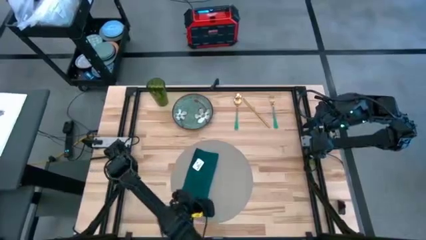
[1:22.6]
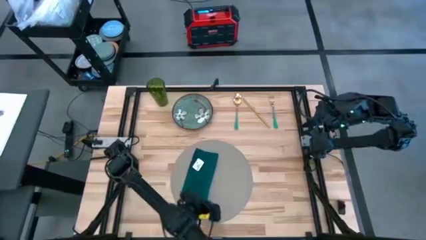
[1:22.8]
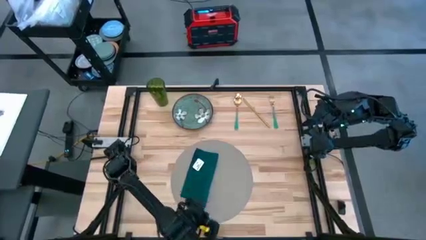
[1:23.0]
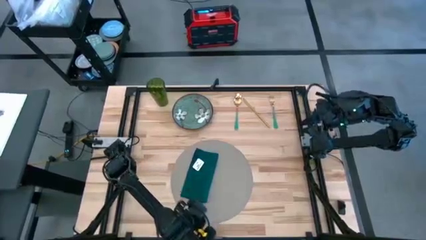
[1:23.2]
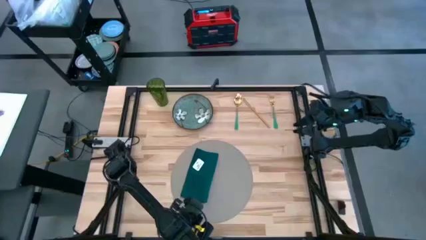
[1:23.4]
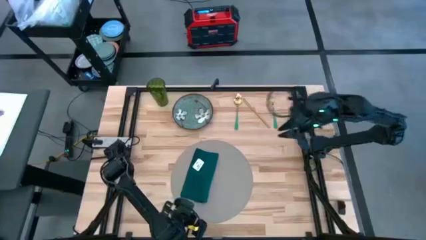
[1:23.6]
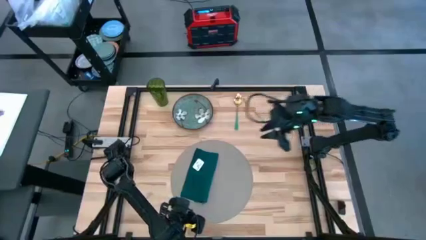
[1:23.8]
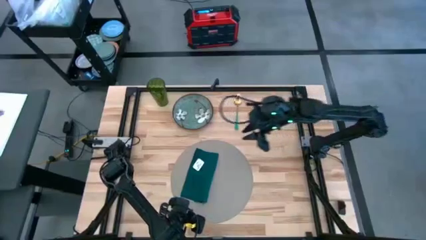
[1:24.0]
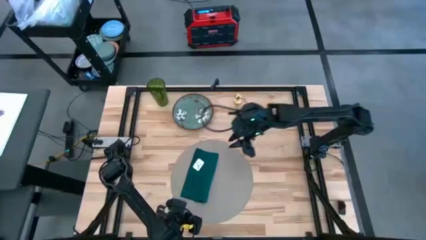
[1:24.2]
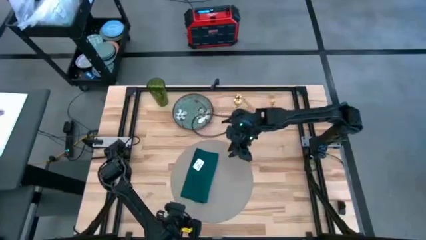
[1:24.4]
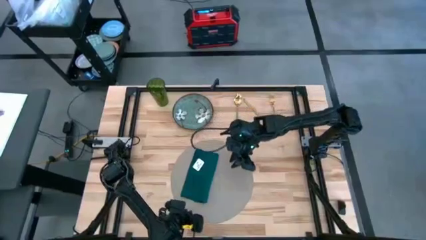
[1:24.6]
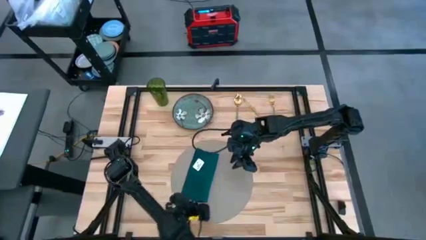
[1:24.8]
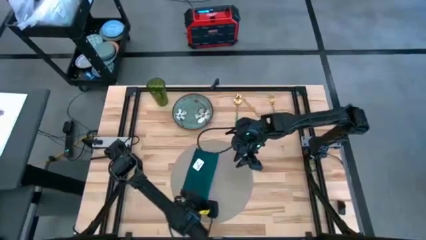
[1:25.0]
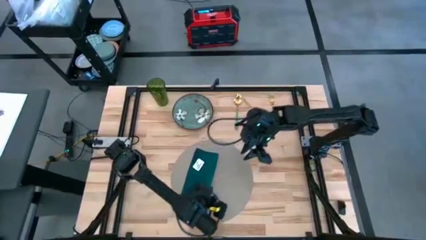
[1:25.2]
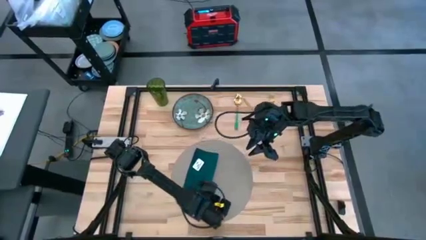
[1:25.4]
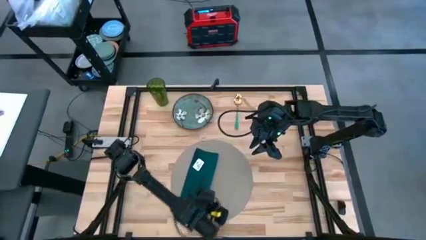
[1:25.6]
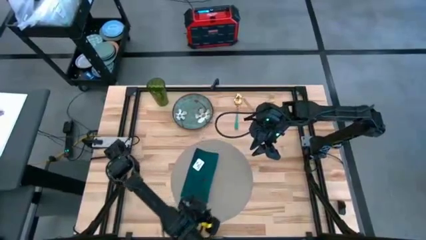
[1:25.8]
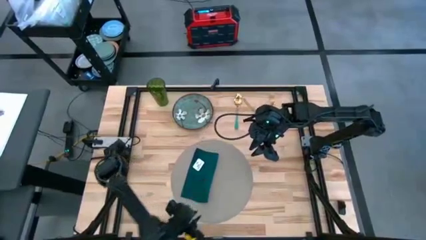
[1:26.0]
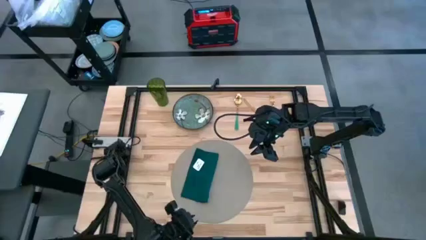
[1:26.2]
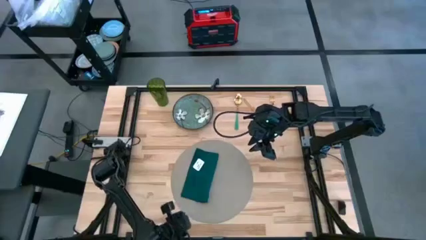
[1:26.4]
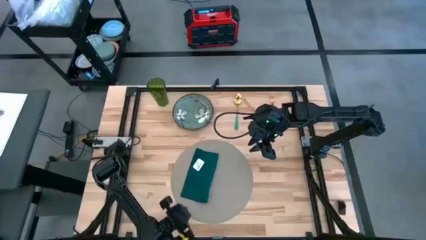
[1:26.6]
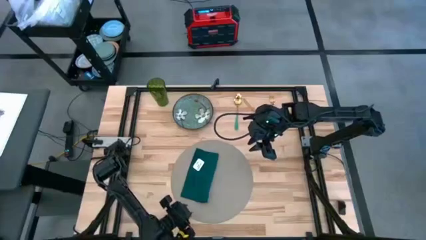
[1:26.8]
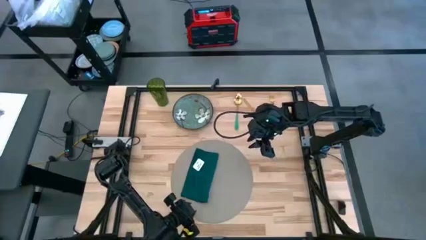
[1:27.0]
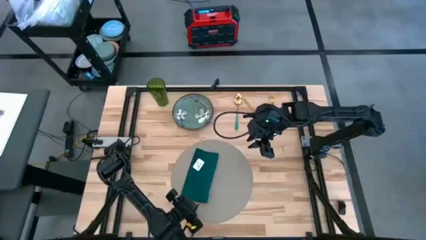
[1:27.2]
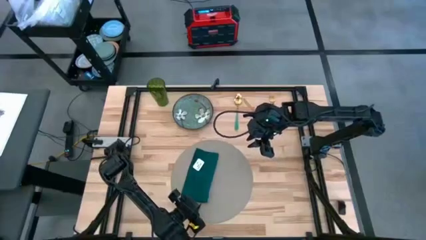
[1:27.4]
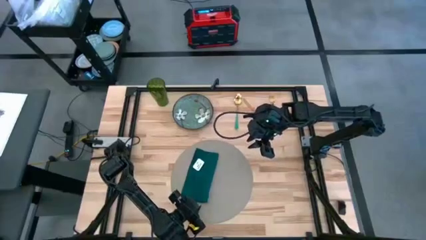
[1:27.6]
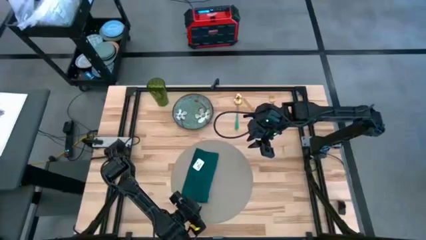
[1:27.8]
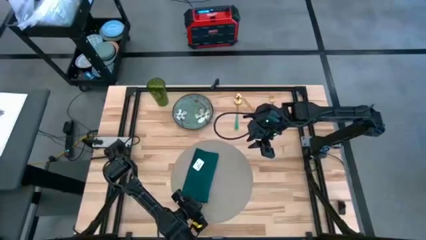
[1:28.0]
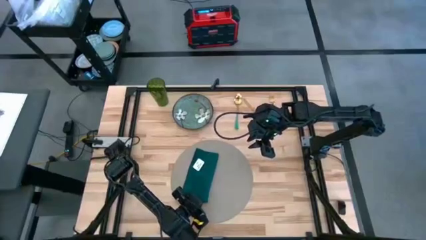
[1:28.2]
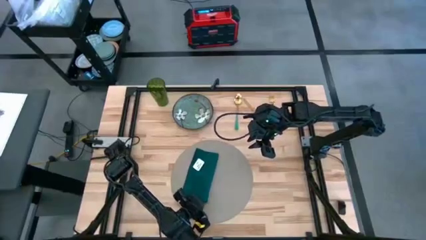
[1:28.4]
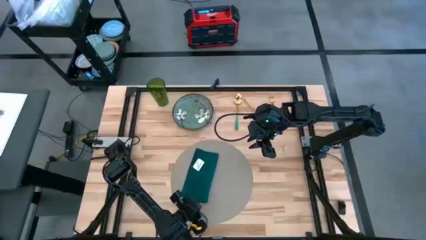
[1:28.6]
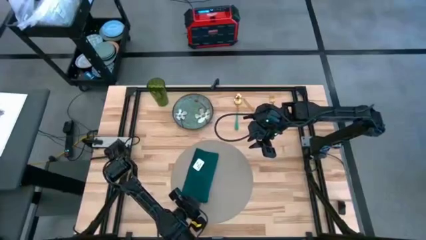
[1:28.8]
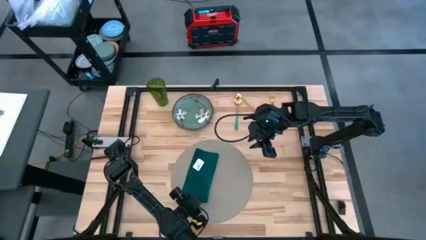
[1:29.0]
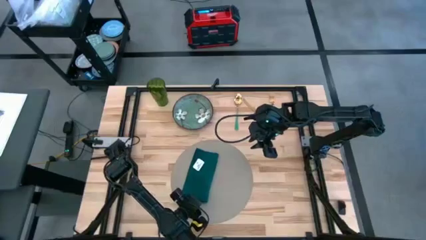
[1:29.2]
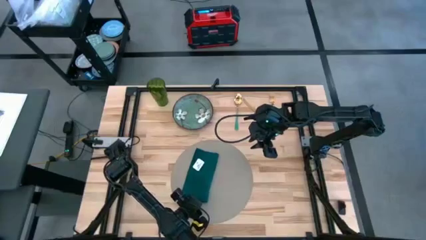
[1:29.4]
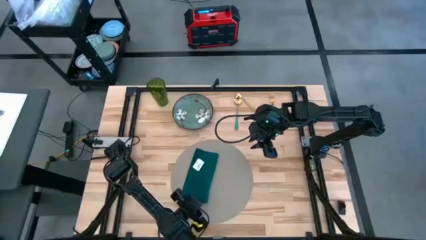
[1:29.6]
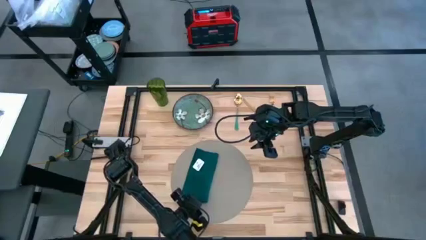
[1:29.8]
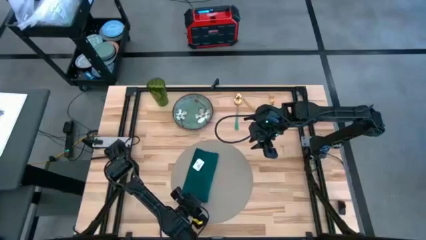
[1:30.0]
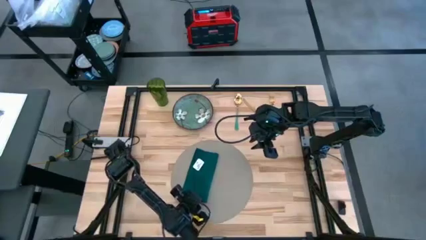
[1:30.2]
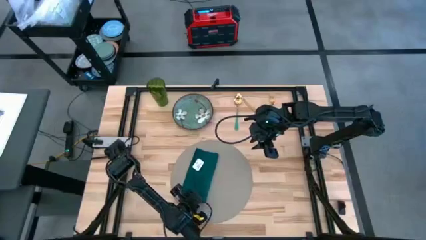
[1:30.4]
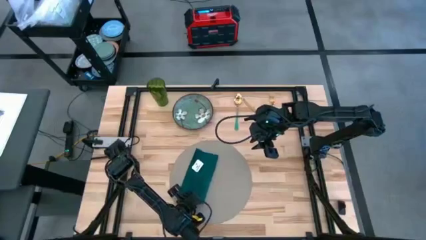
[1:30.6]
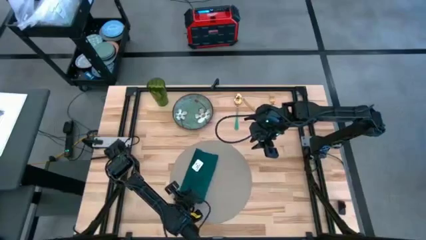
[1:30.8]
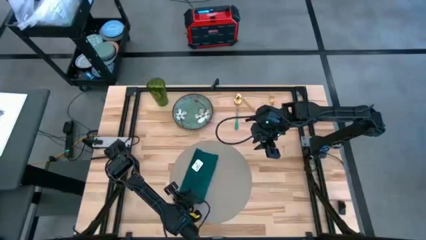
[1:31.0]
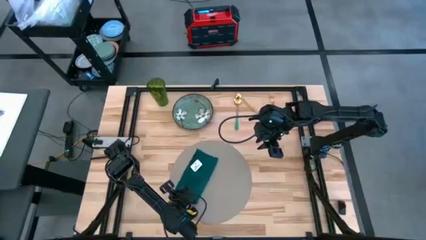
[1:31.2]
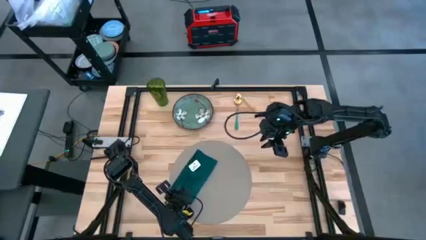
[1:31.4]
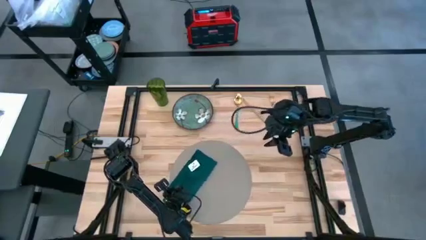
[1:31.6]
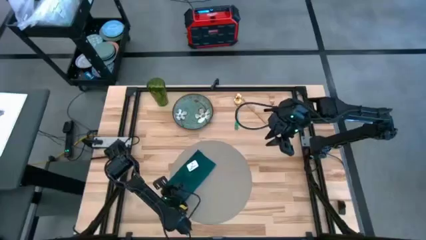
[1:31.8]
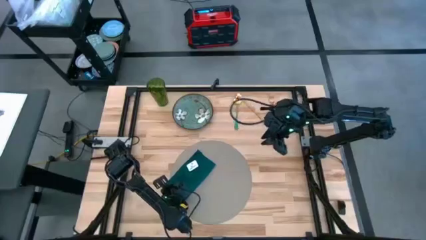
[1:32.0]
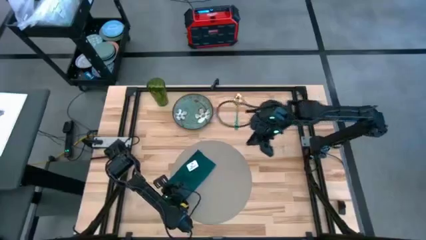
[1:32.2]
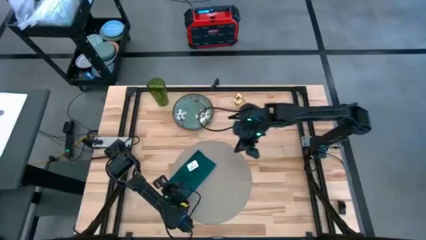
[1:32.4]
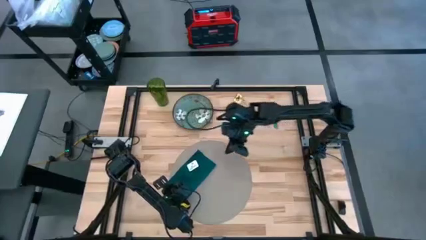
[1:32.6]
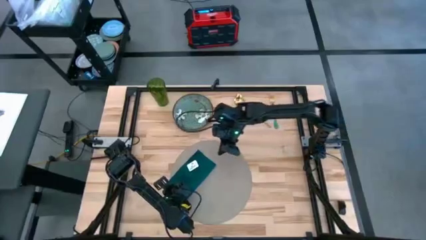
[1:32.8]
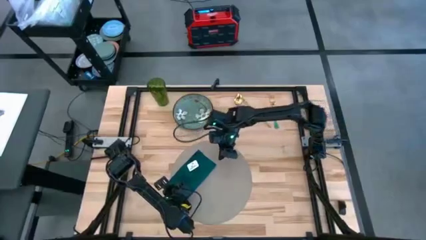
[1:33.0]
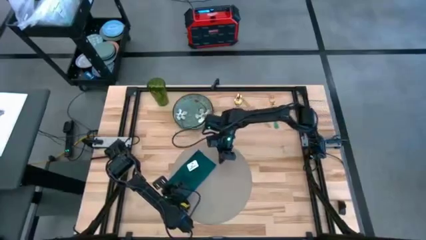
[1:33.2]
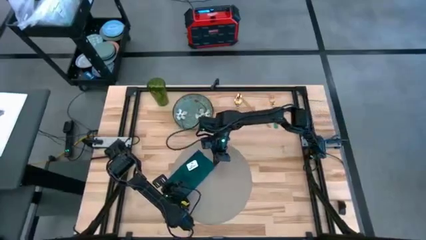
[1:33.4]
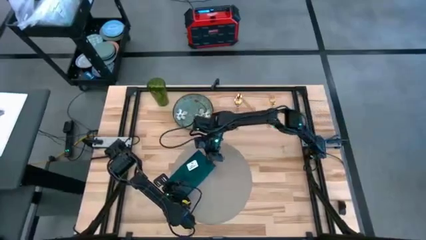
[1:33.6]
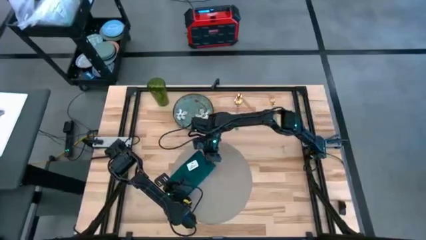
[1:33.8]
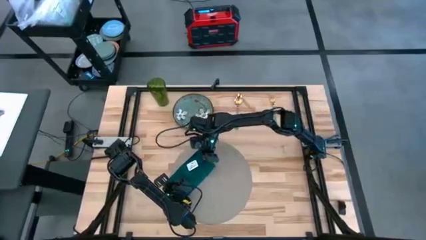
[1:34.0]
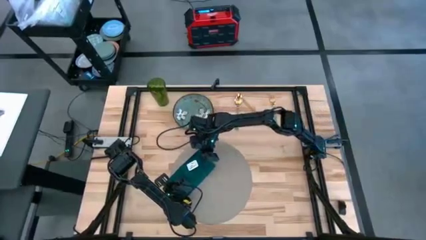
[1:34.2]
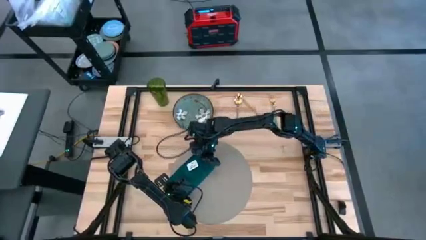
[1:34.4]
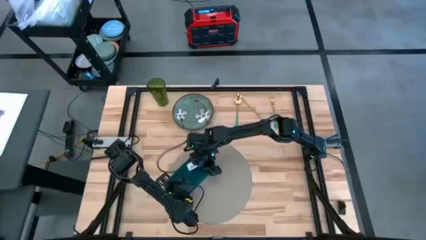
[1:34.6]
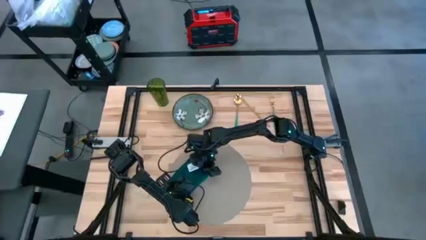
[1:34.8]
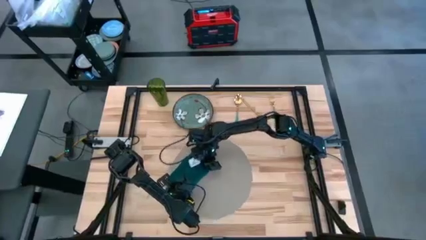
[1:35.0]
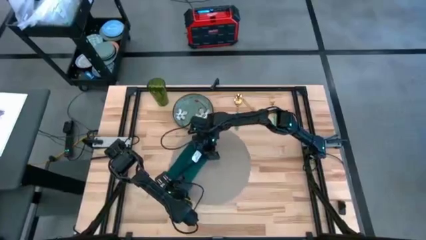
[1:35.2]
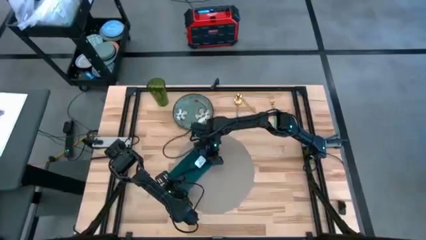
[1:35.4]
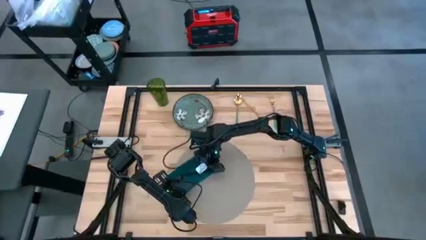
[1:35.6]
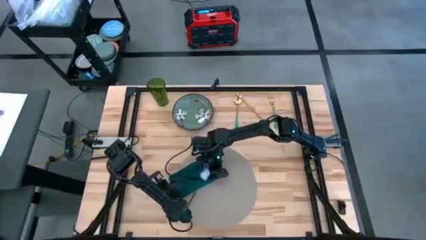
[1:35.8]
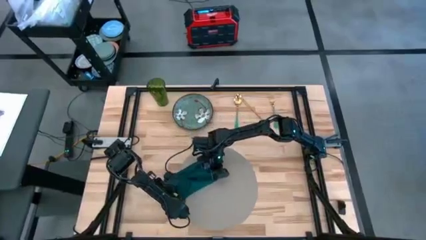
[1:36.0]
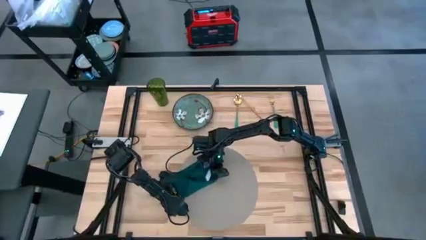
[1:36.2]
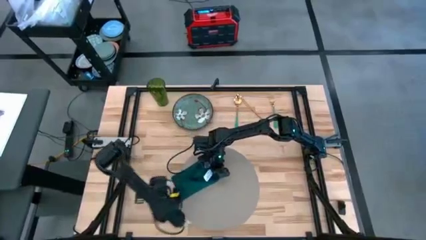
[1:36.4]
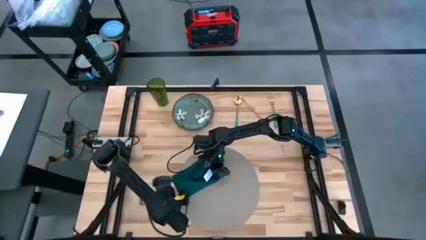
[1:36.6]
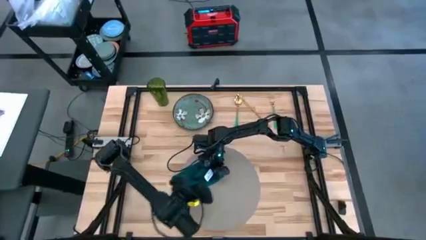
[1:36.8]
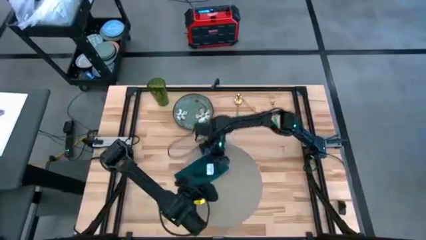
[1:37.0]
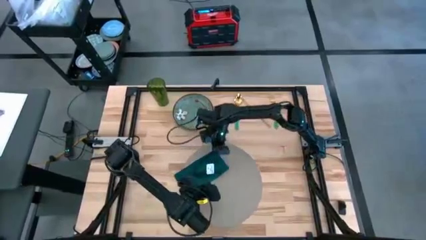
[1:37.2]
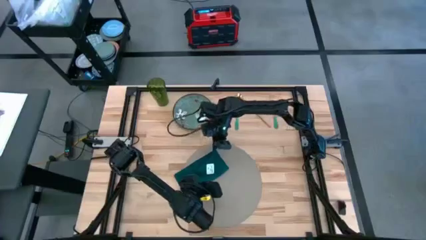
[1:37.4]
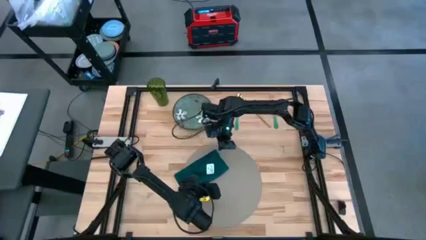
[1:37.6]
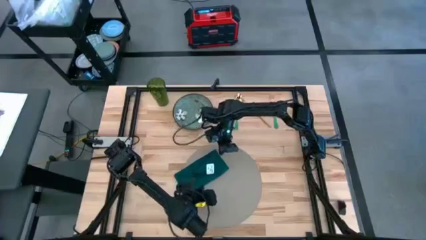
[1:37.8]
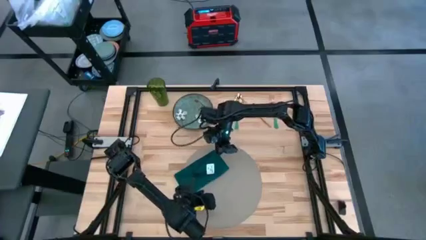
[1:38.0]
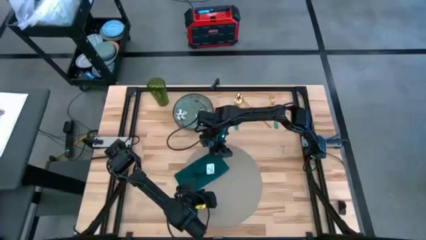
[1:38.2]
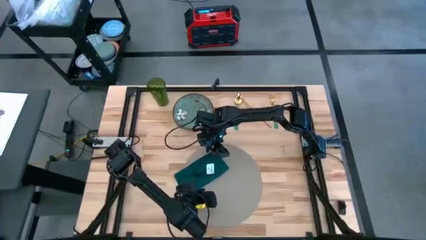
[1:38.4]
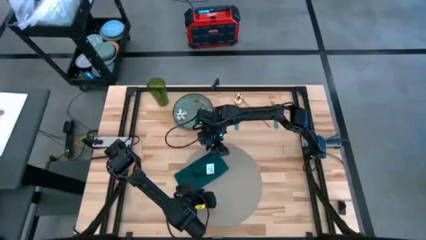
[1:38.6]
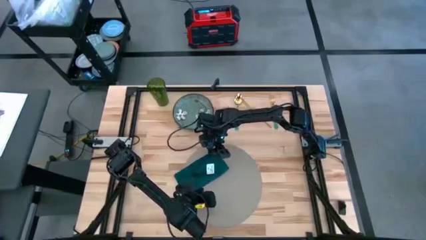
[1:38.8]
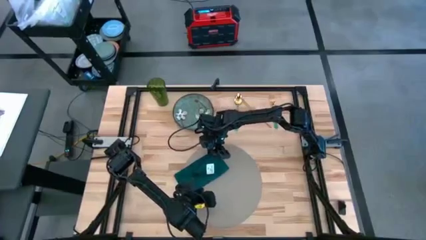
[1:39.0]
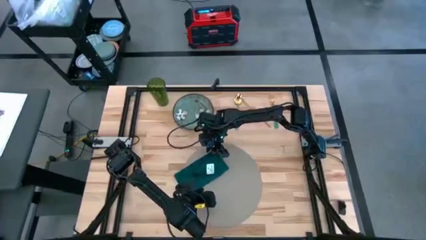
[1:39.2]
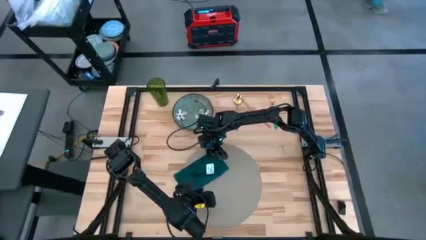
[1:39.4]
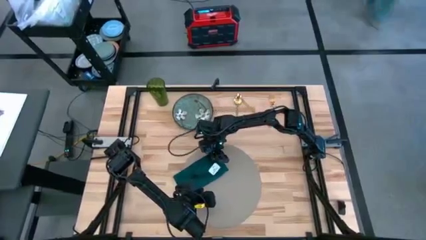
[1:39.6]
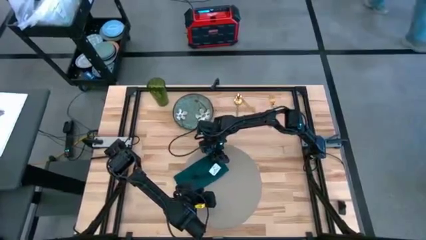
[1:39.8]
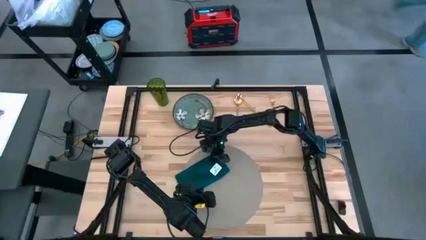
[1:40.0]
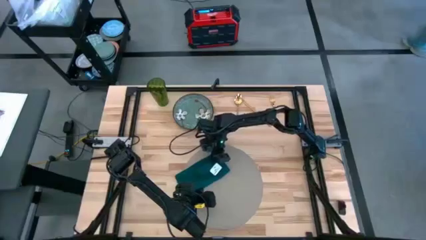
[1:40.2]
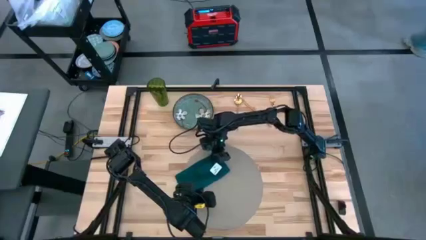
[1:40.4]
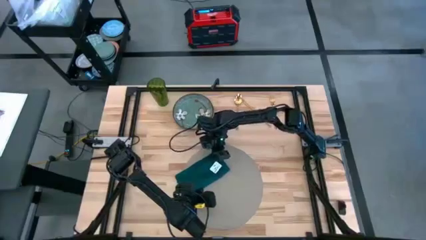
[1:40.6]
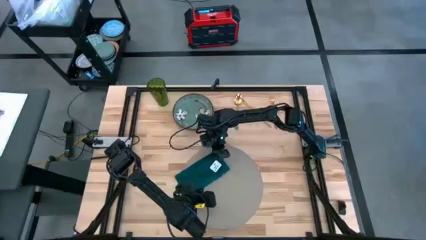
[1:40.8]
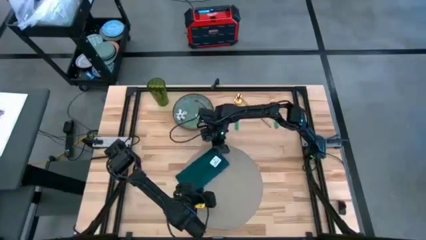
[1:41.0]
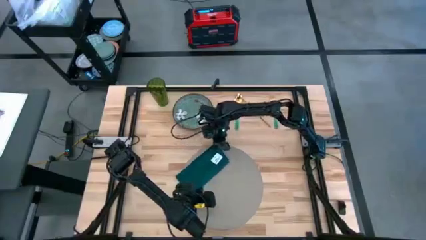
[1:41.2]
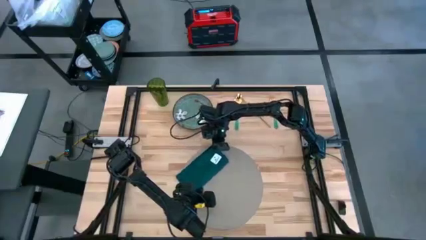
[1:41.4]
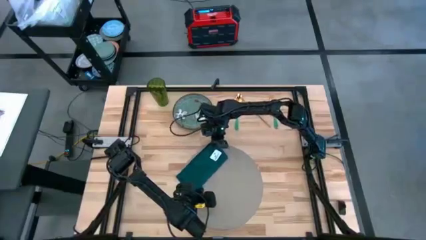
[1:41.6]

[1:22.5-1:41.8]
Task: Set table place
Fold the green napkin
